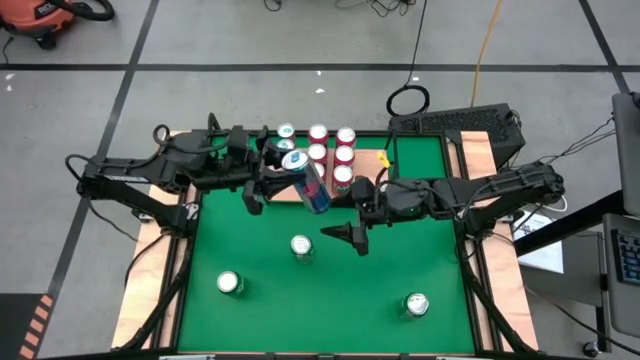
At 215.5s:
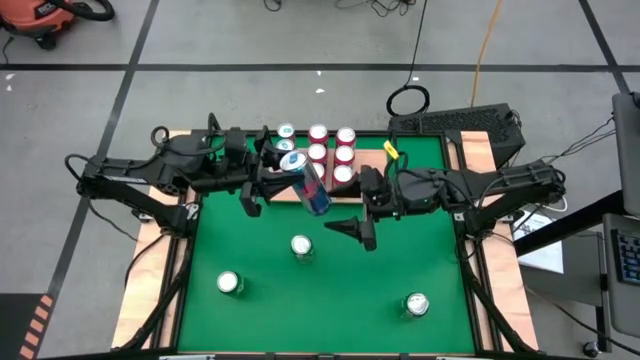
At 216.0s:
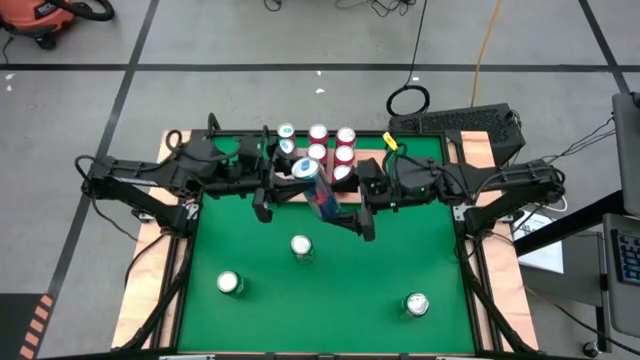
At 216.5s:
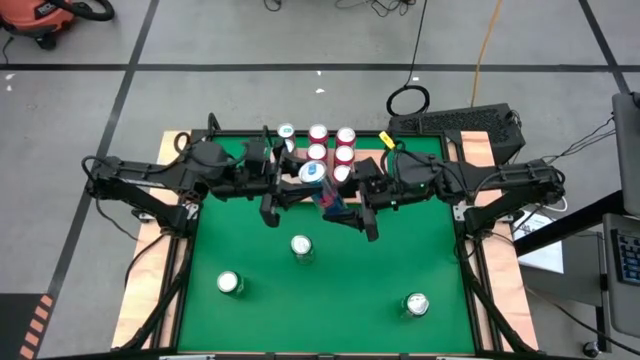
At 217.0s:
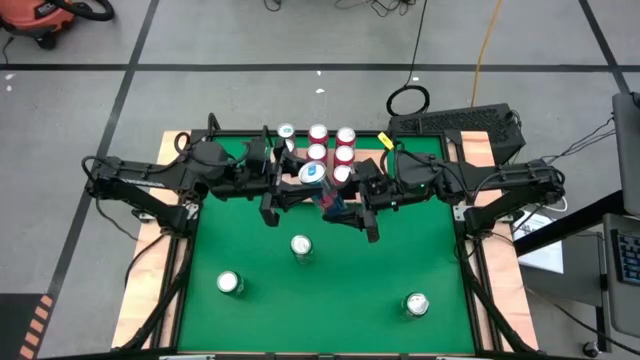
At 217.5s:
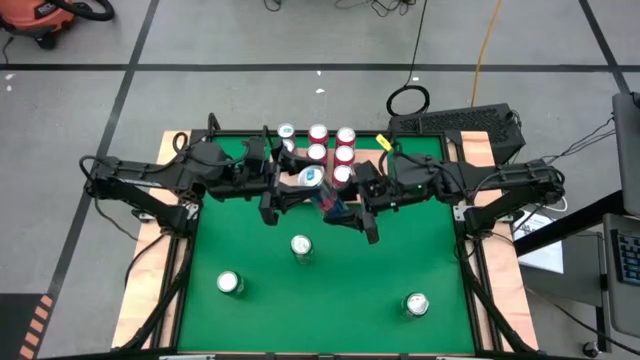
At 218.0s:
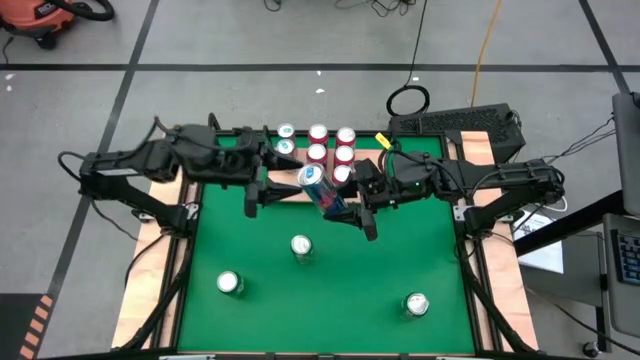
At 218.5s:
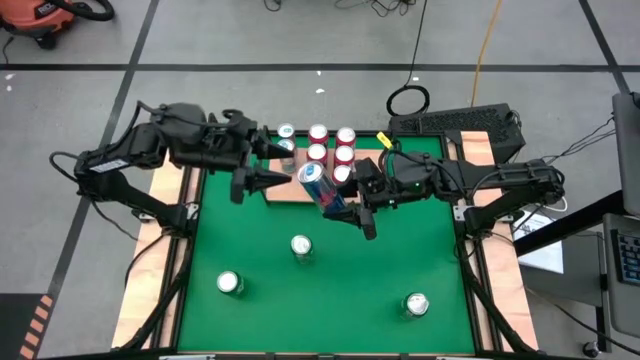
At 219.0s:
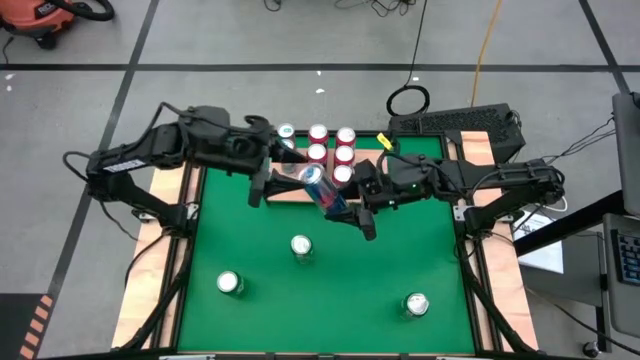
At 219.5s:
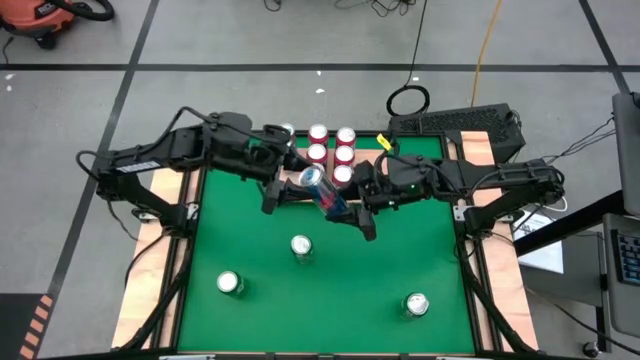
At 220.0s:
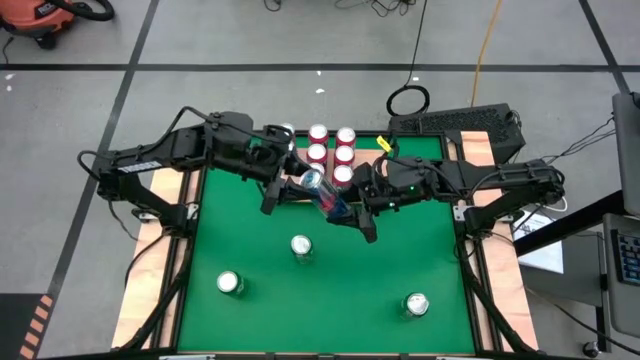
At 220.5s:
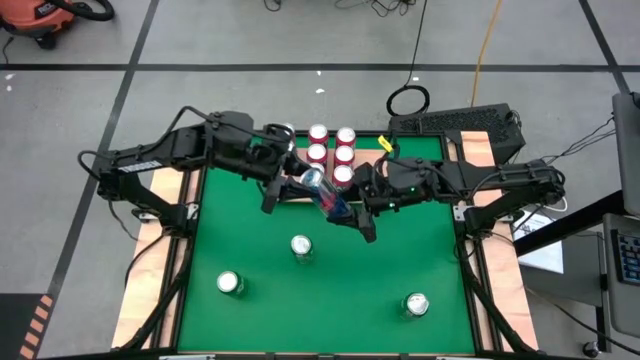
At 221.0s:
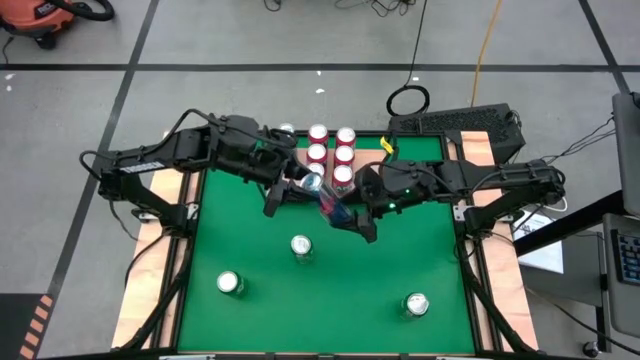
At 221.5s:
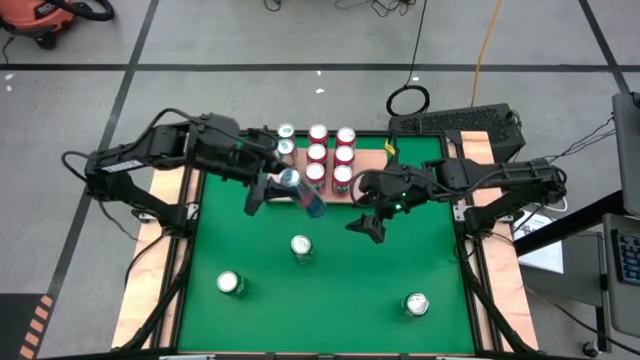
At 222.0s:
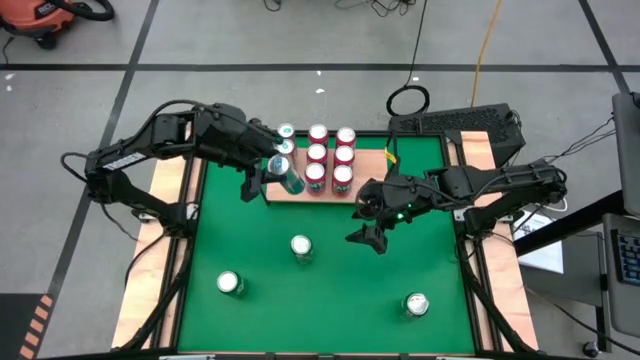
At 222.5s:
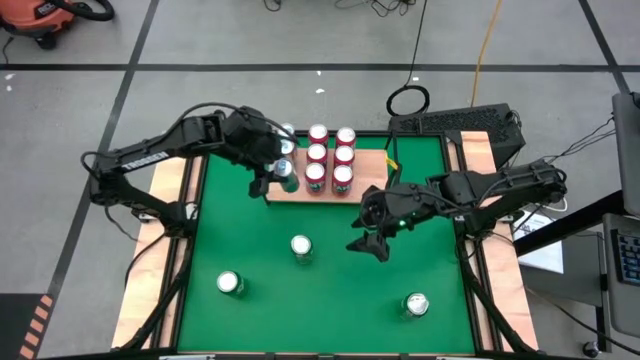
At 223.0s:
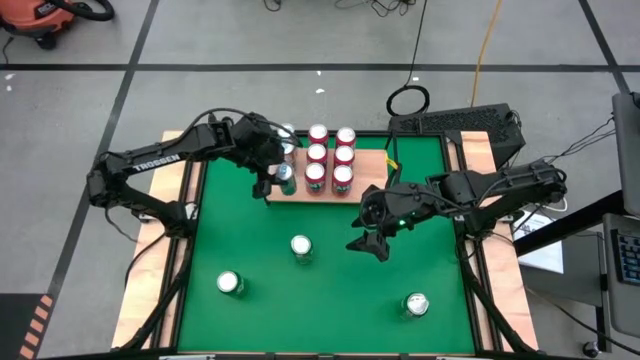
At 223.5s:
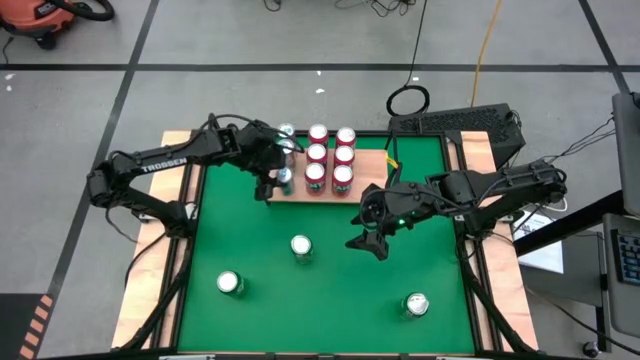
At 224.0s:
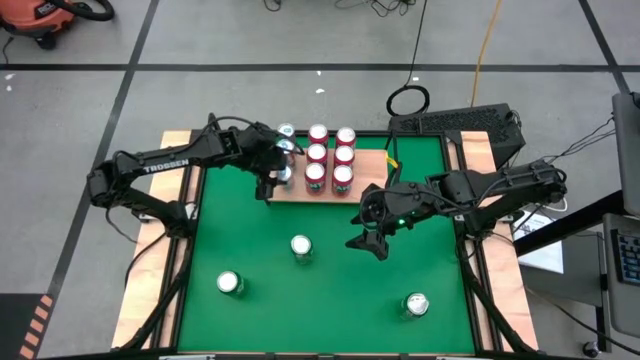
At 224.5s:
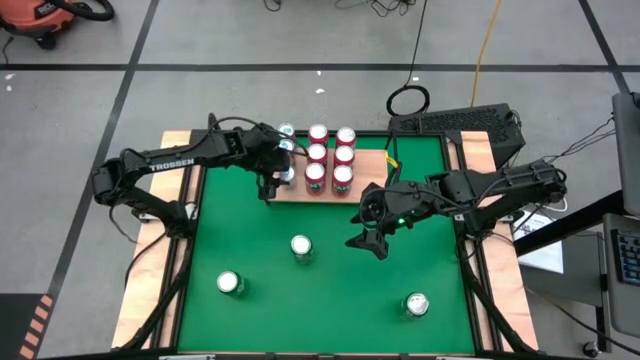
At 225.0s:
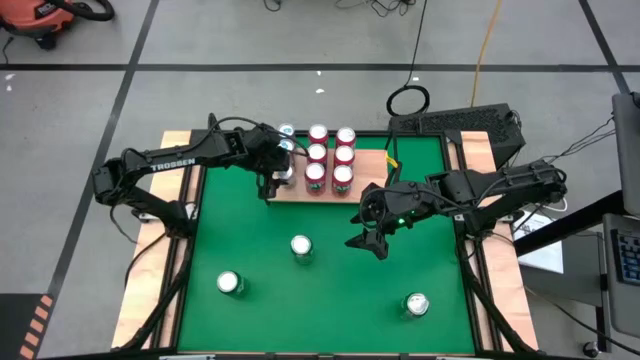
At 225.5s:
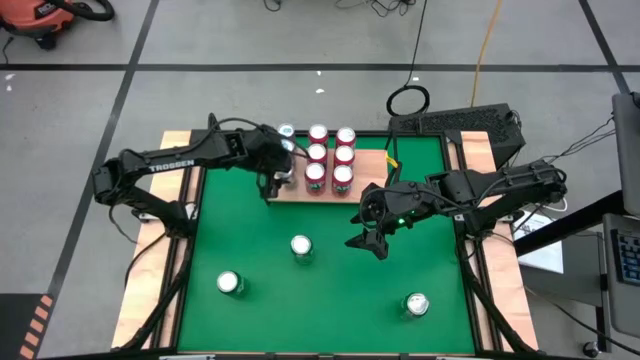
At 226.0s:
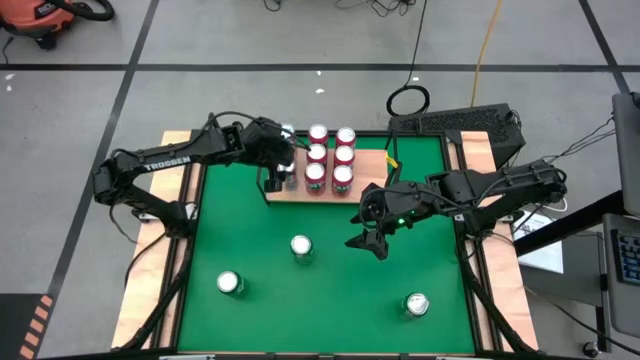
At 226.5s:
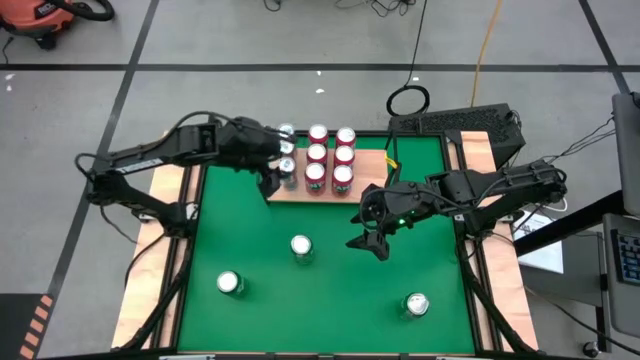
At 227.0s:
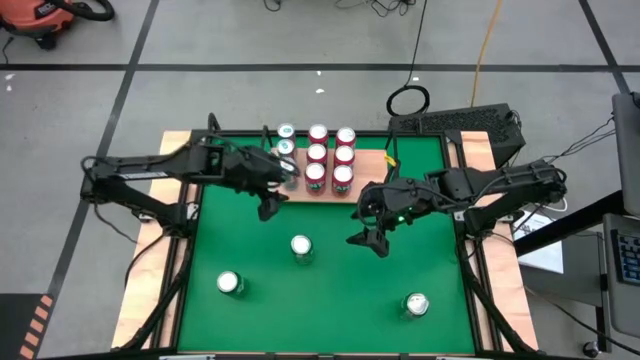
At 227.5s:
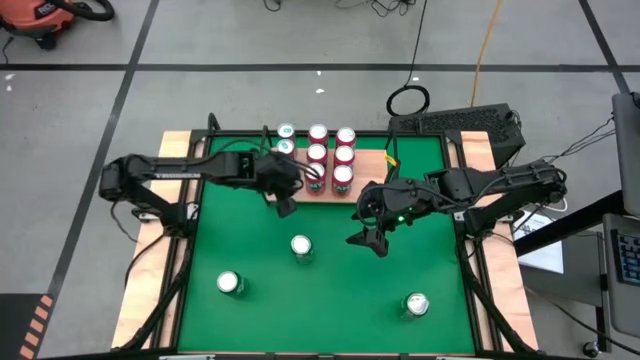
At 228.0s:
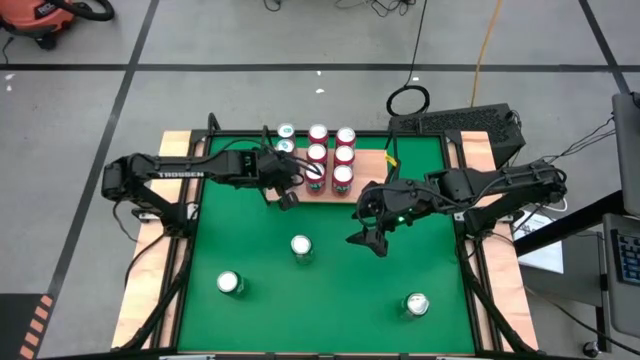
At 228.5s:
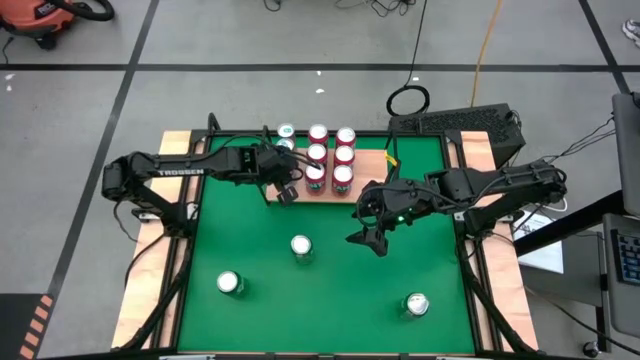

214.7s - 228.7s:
Task: Place canned beverage on shelf
Put the blue soda can on the shelf aligned with the other blue soda cans

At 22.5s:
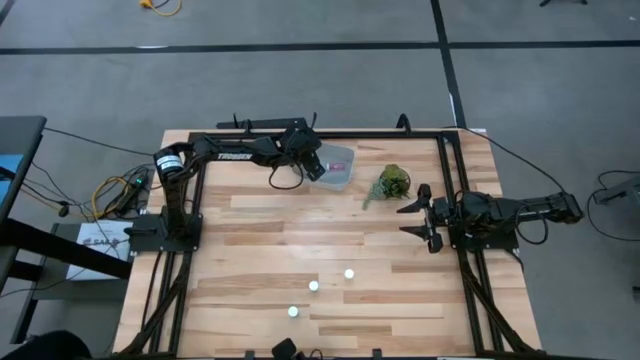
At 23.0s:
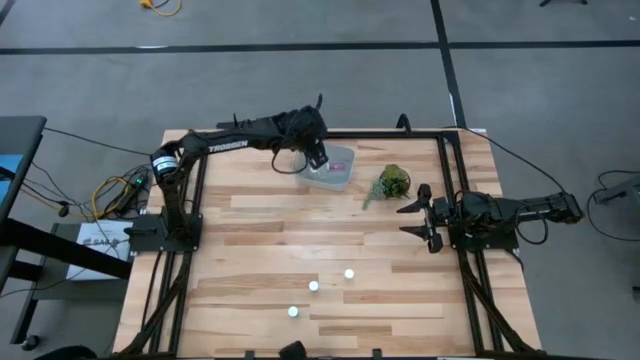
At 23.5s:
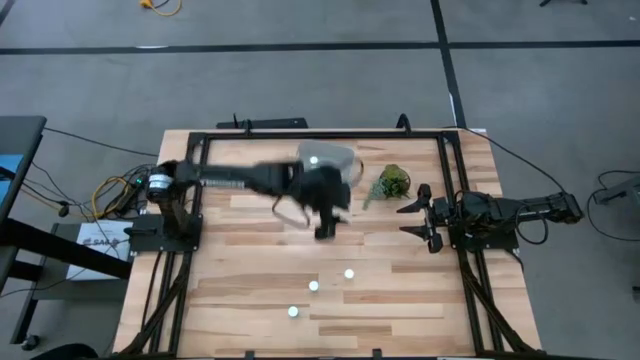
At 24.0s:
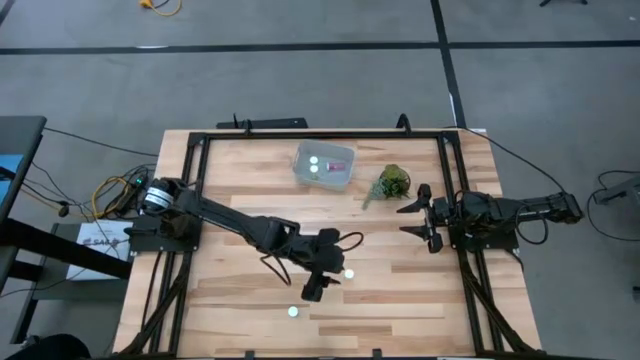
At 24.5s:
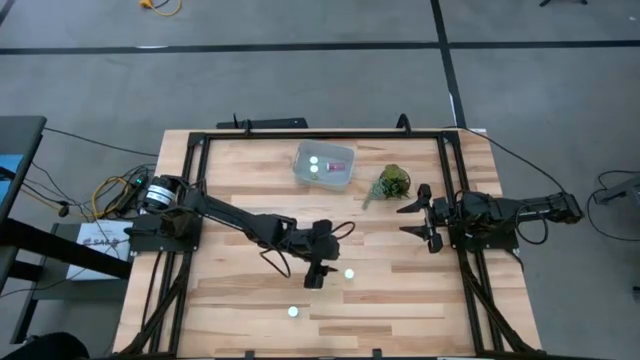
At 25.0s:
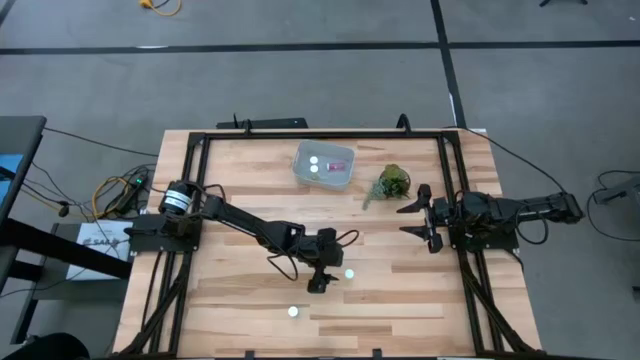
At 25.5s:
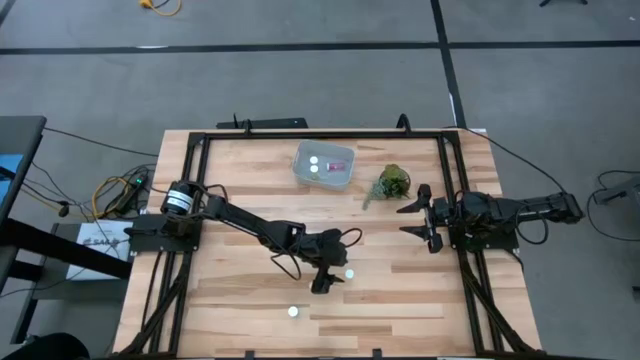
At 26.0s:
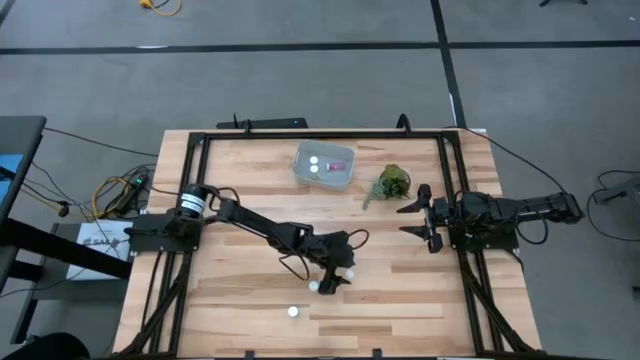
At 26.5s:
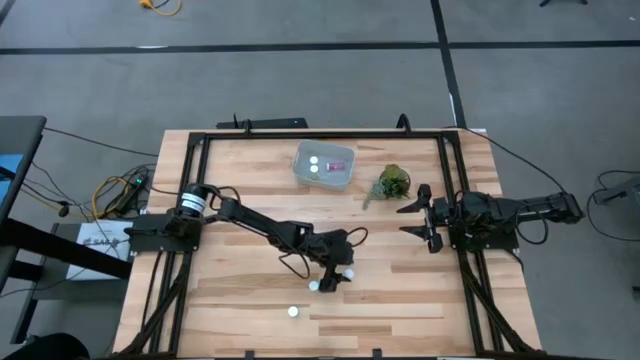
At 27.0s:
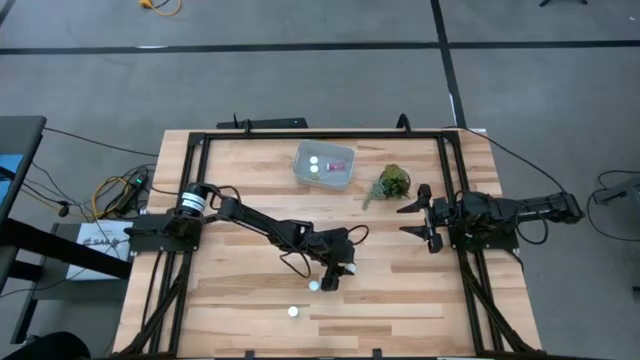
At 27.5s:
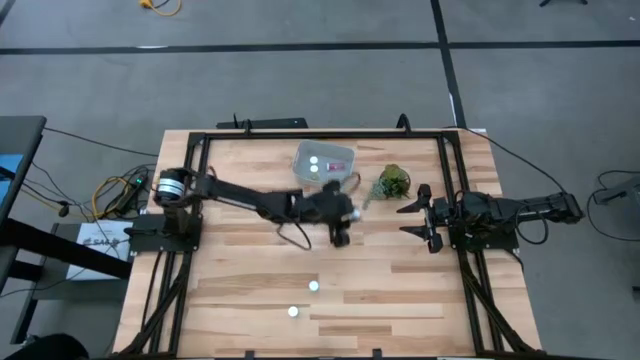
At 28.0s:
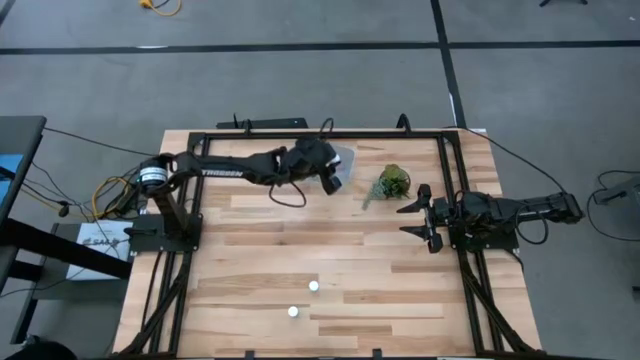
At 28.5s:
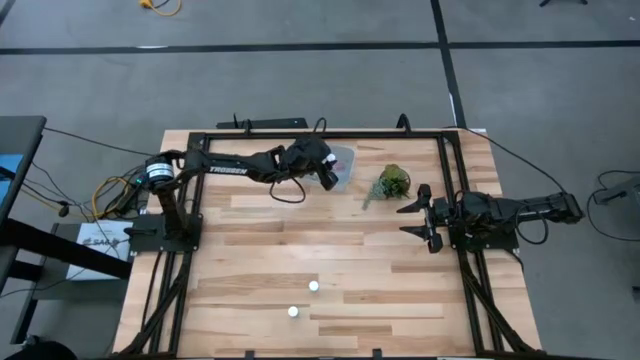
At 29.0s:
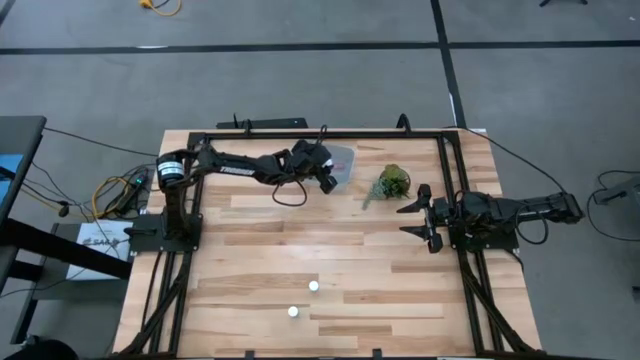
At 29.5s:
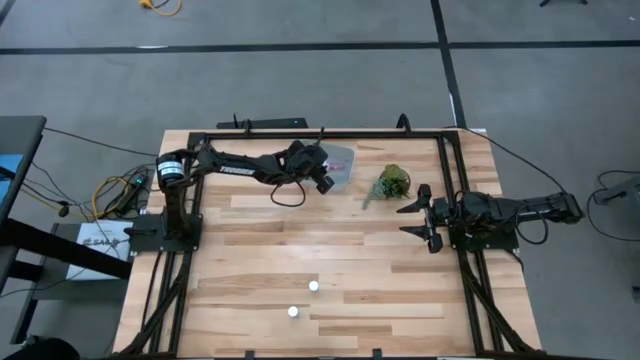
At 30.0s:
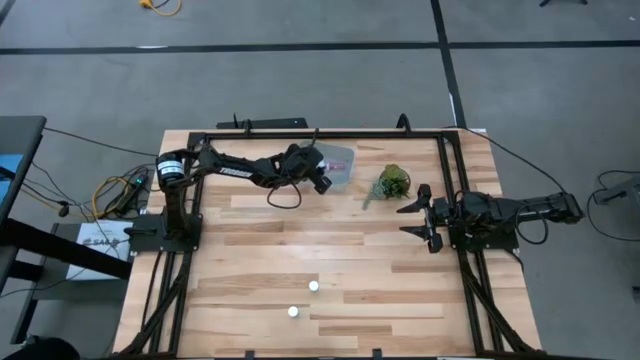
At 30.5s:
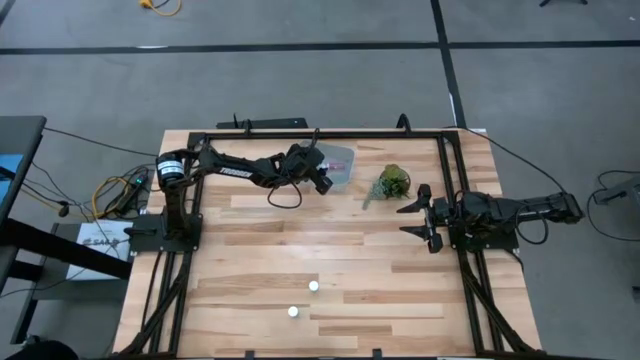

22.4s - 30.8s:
Task: Pick and place pill bottles into a basket
Put the yellow pill bottle into the gray bin
